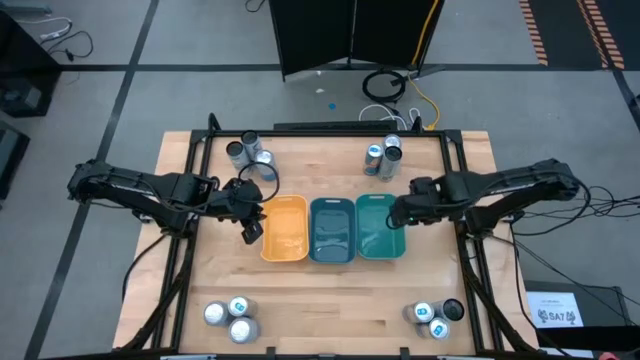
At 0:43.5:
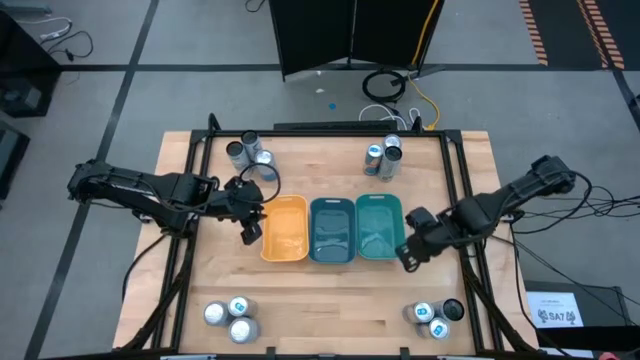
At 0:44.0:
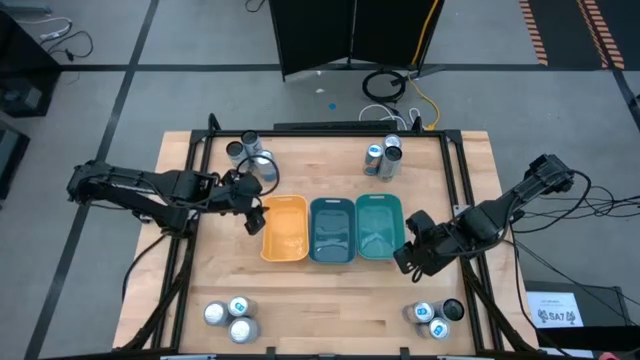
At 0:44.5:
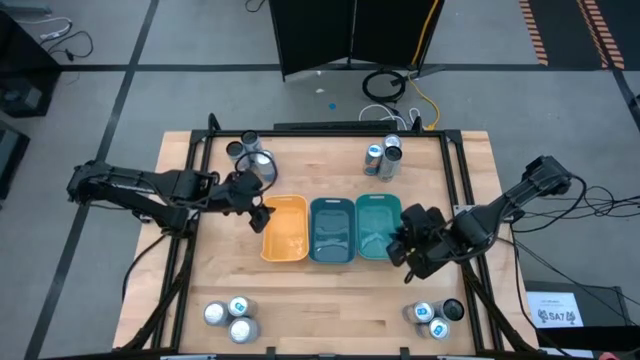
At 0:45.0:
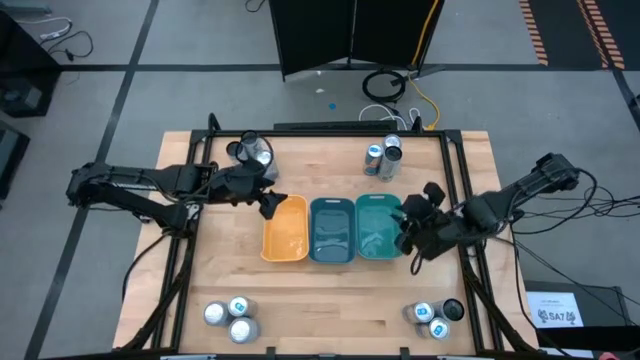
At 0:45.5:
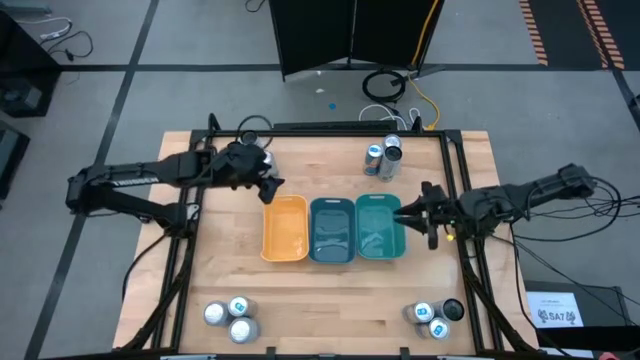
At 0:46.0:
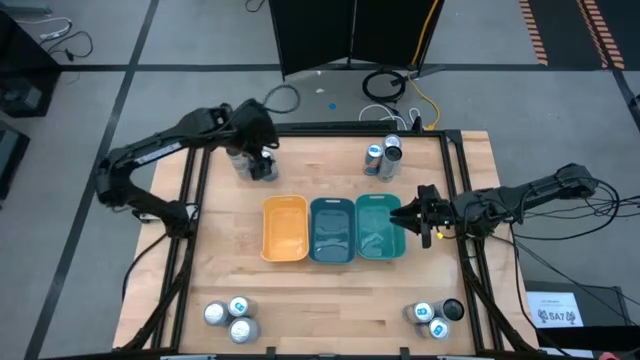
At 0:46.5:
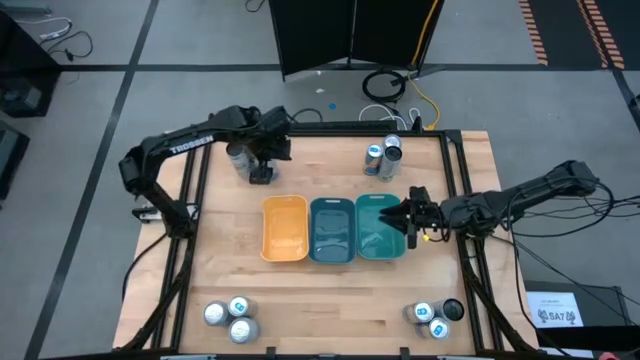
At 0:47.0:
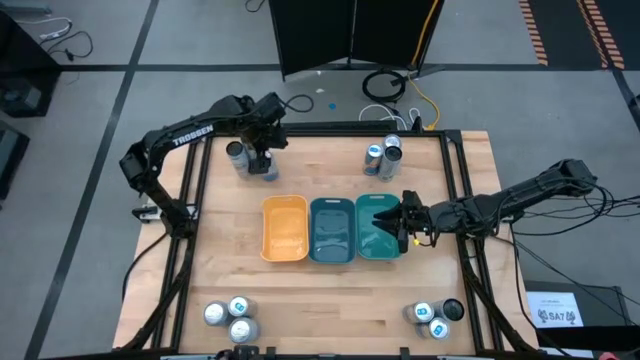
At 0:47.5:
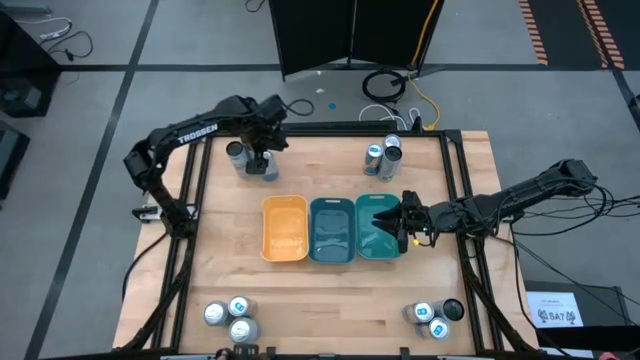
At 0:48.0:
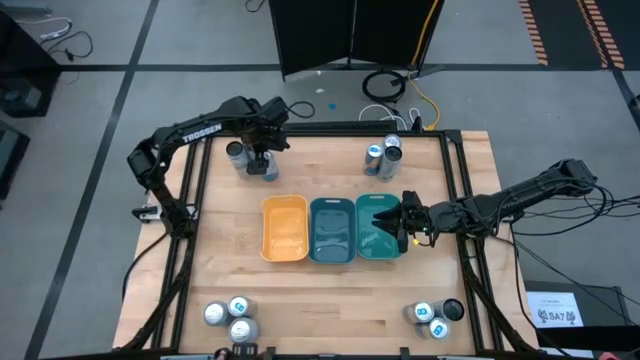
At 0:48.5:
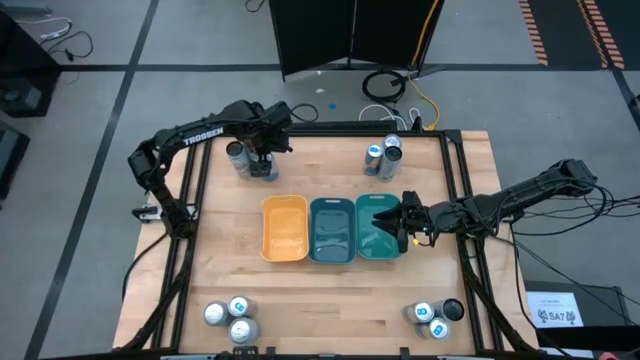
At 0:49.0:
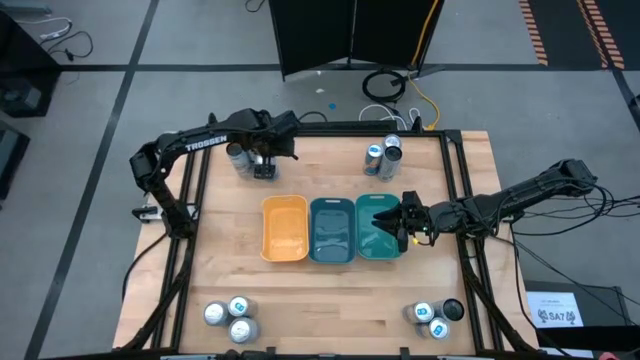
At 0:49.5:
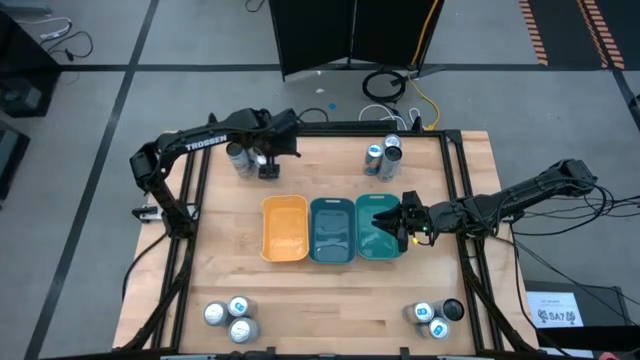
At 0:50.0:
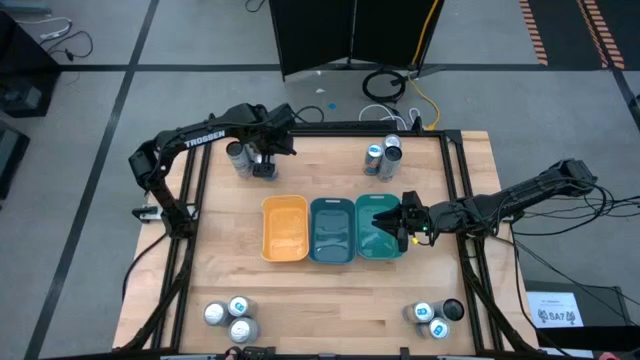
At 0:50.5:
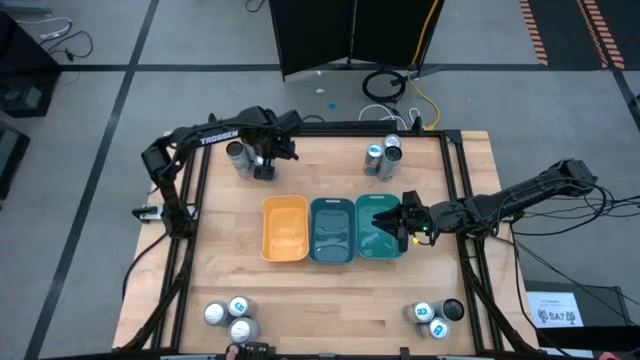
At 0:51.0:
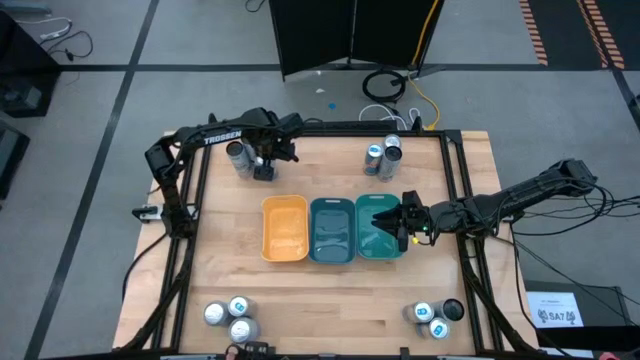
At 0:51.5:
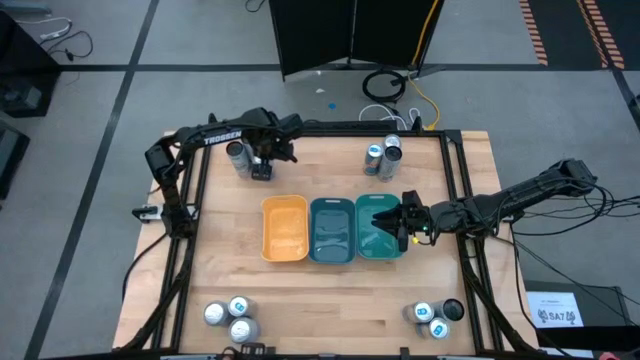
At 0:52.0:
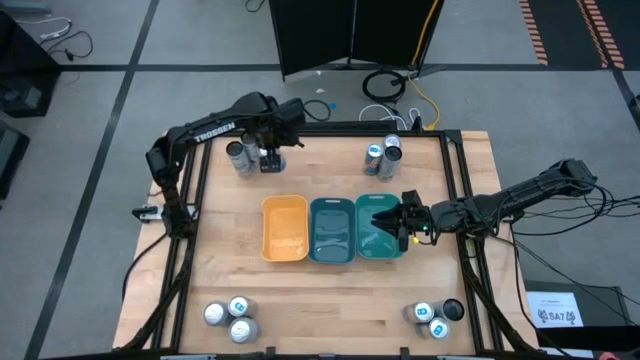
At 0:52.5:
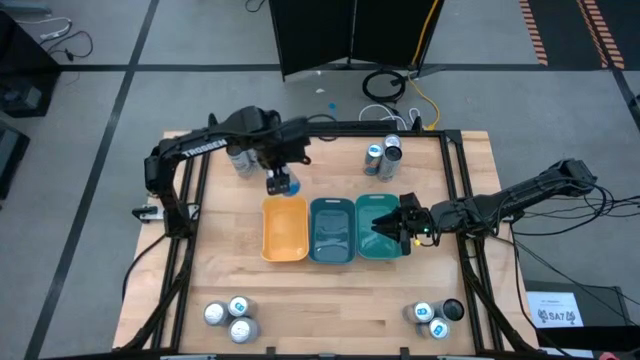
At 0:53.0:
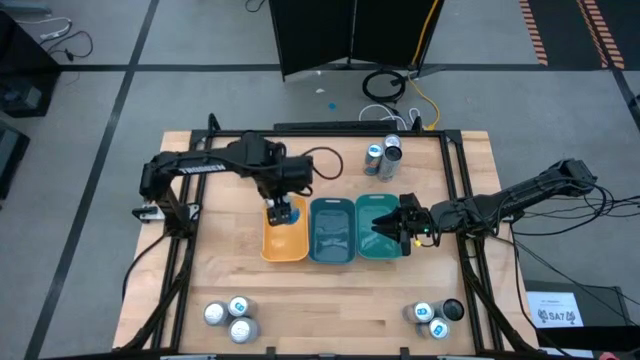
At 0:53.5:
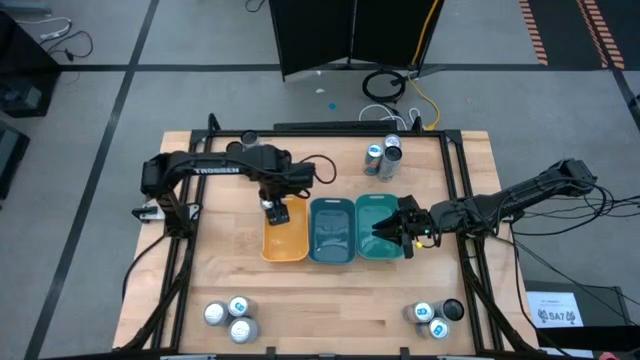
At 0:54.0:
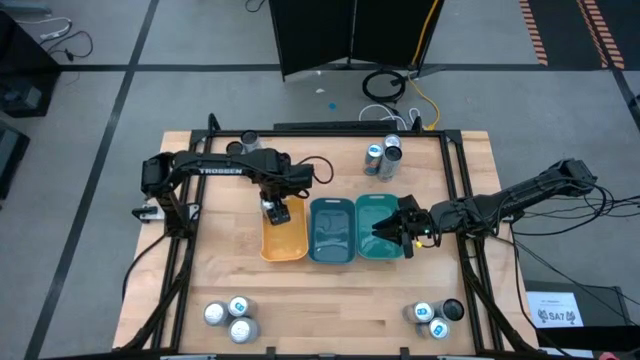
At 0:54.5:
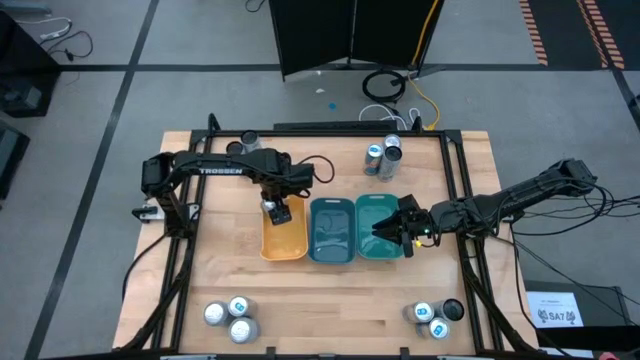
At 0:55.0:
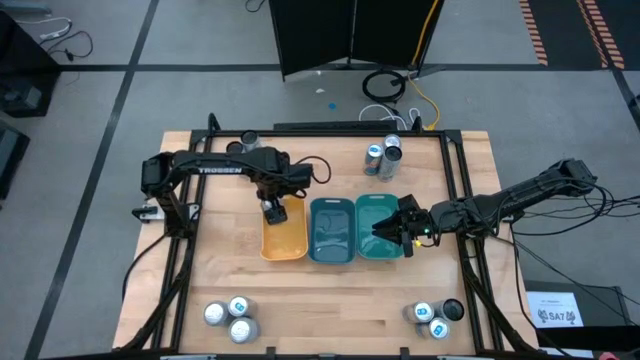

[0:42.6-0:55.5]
Task: Sort soda cans
Put the blue-white soda can into the yellow bin

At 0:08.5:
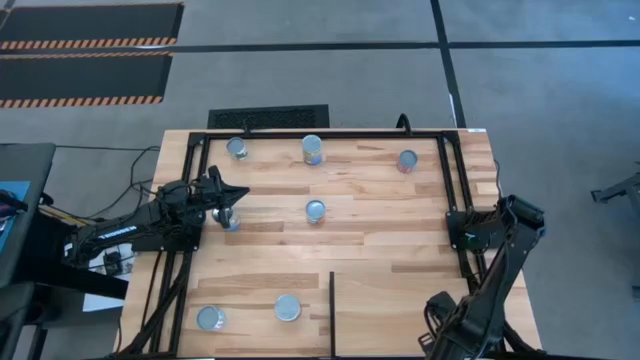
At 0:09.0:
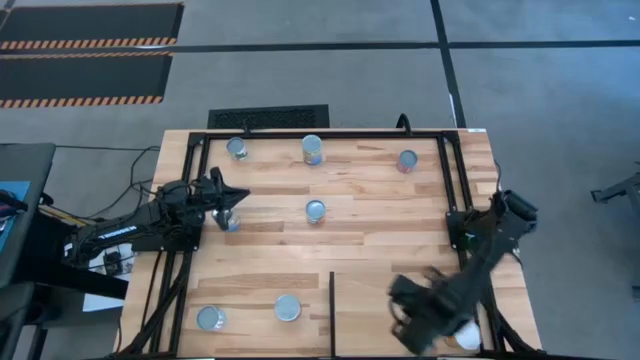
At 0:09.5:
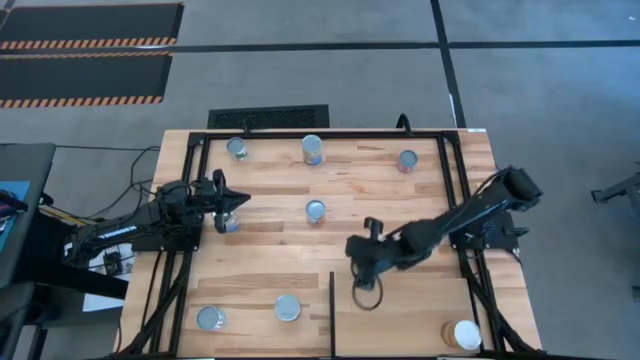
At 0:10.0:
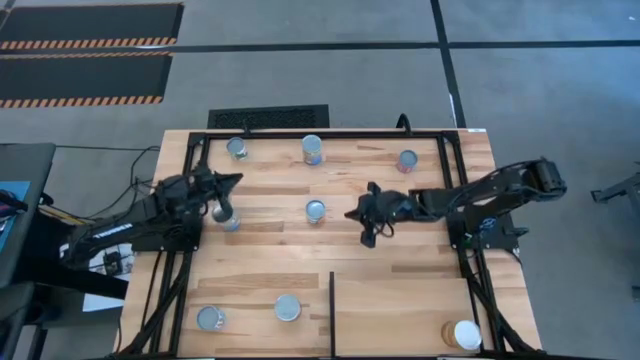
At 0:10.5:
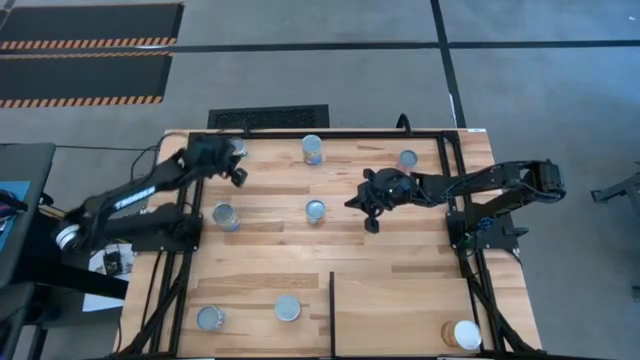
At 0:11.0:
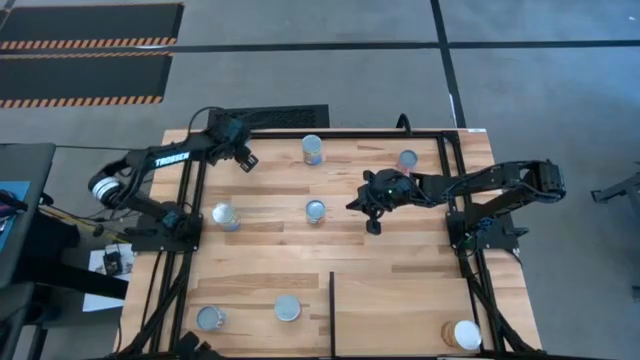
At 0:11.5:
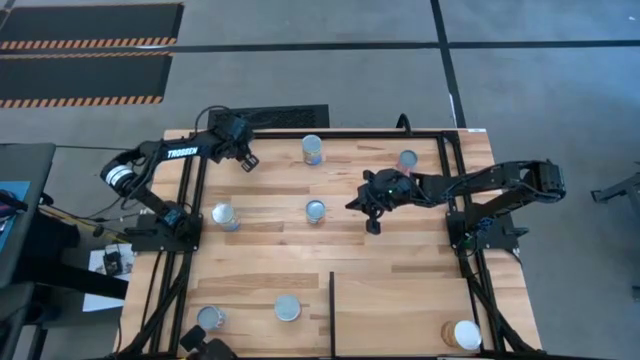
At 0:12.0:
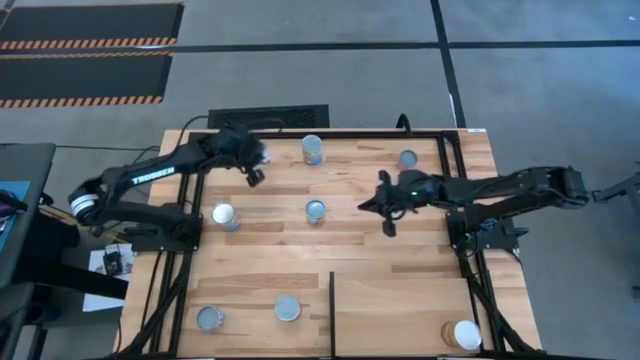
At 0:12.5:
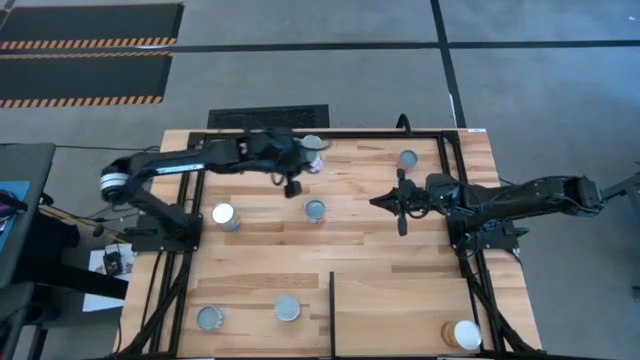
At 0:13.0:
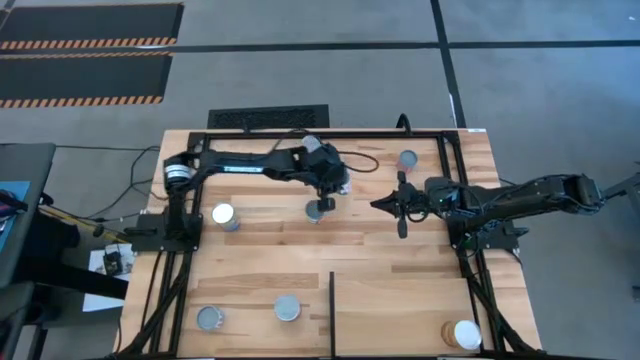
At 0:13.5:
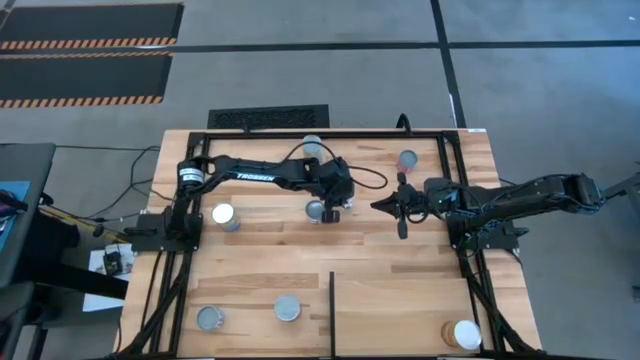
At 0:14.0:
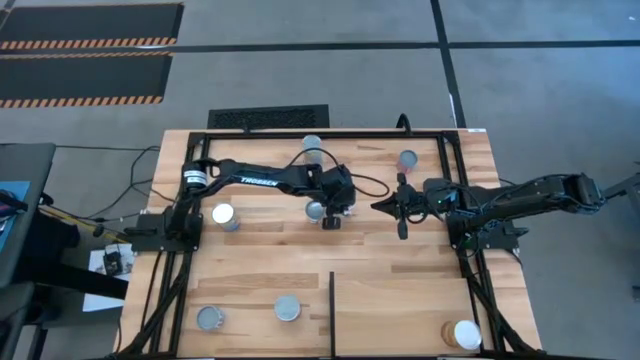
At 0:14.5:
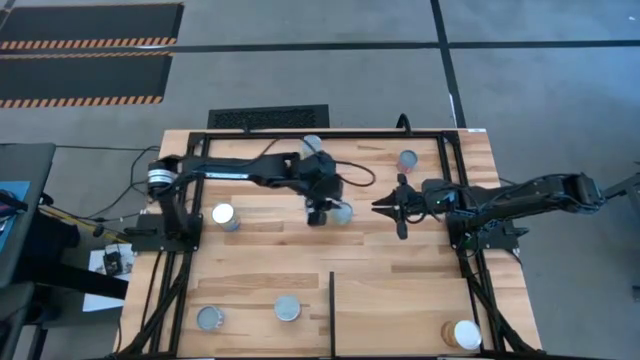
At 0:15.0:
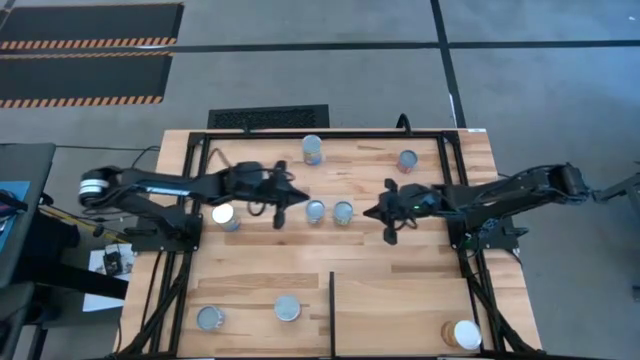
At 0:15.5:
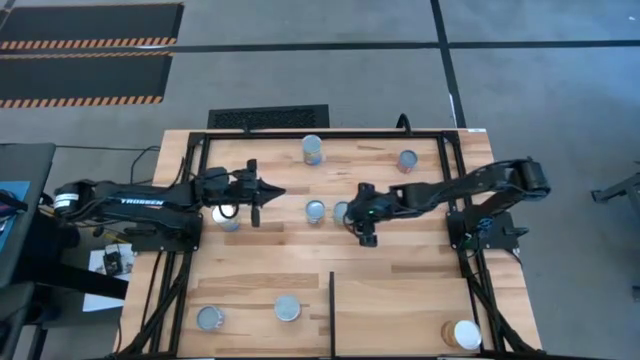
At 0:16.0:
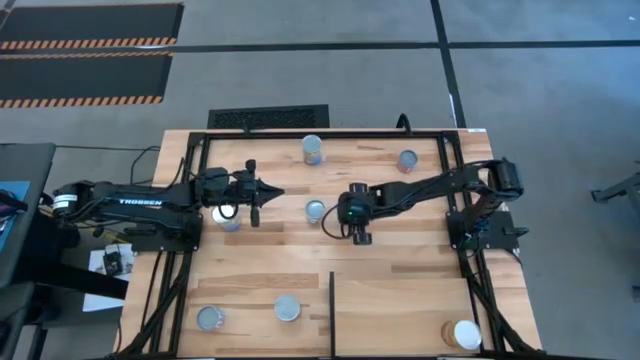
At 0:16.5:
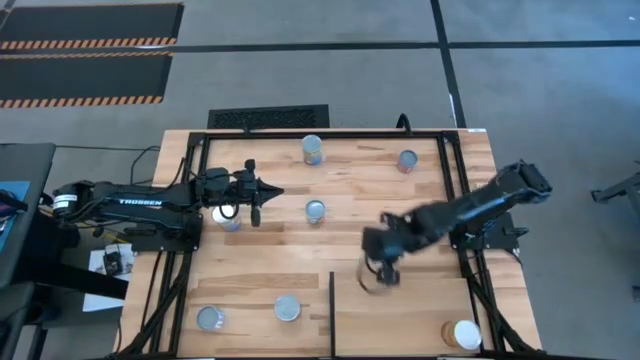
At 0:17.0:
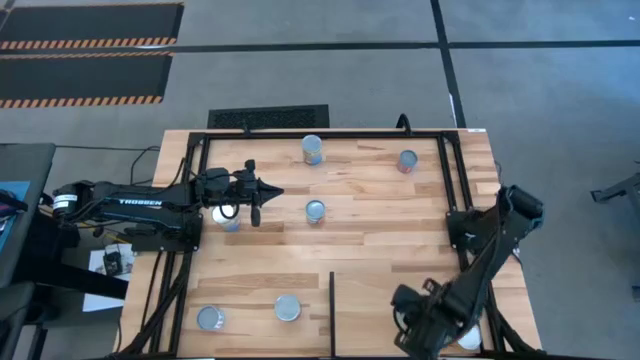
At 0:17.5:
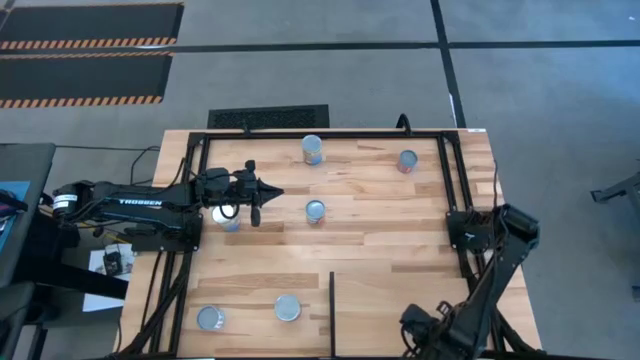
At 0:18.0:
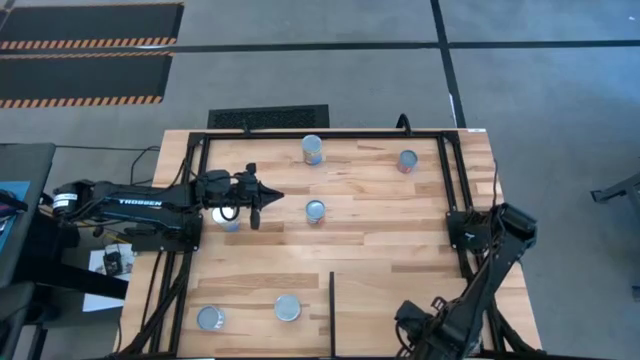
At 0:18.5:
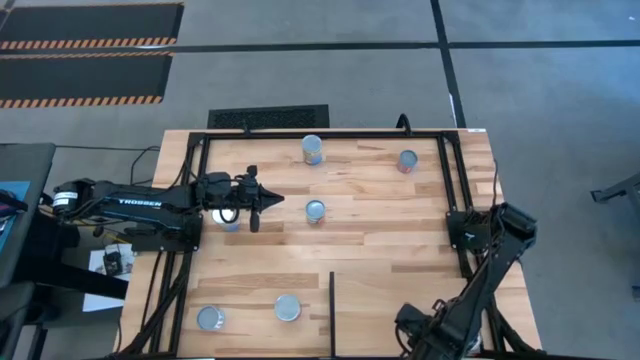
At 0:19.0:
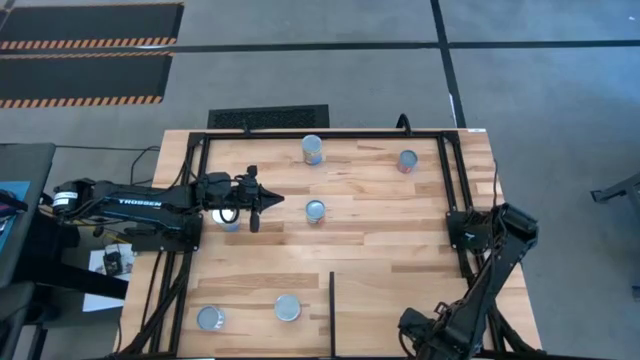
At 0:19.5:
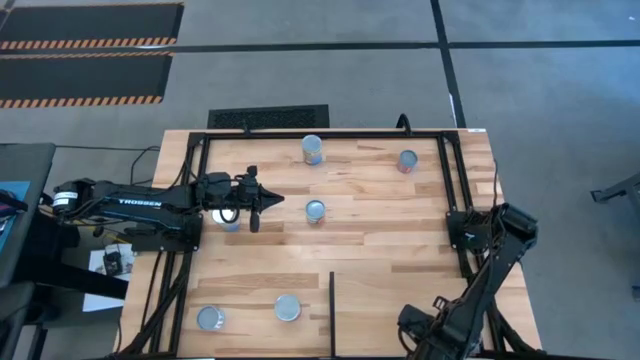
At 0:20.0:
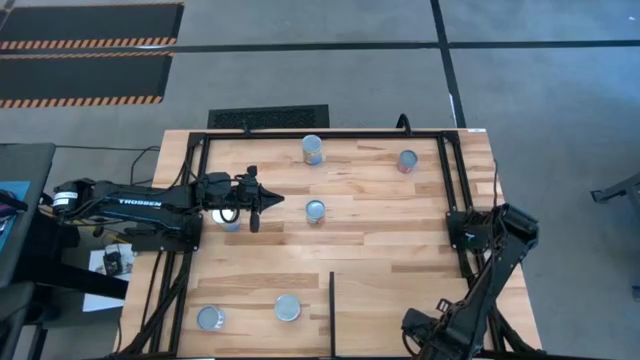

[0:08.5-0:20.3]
Task: Pick and place cans onto a shelf
Put the canned peas on the shelf
